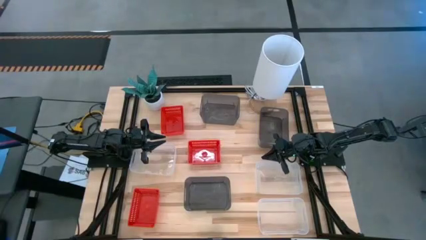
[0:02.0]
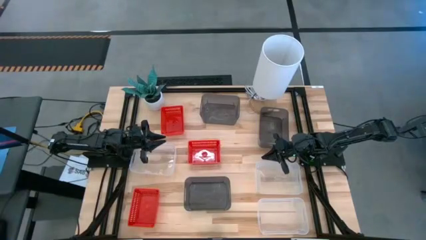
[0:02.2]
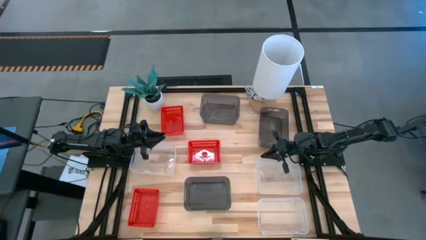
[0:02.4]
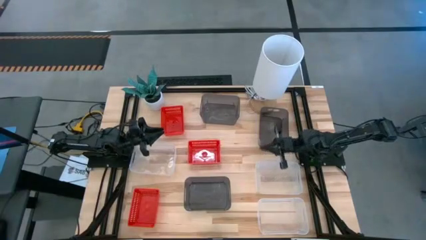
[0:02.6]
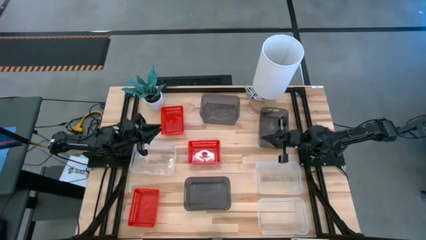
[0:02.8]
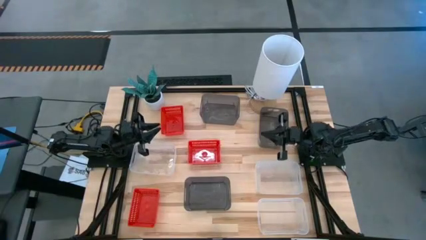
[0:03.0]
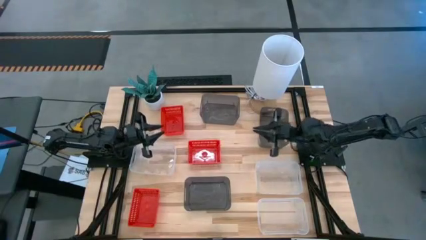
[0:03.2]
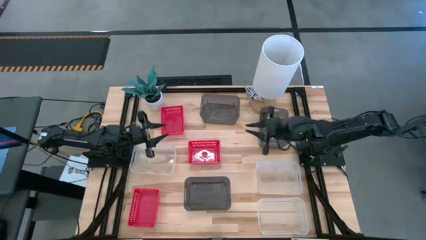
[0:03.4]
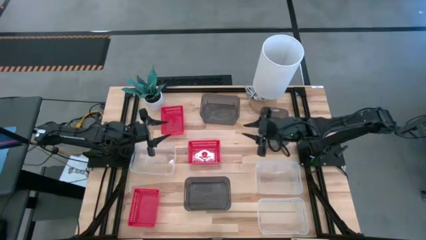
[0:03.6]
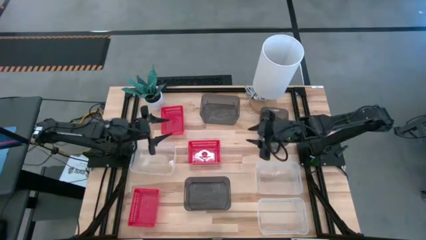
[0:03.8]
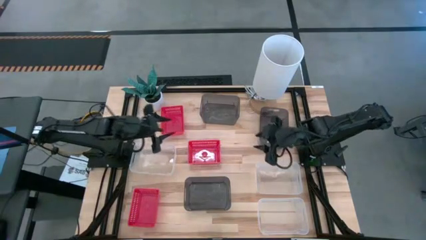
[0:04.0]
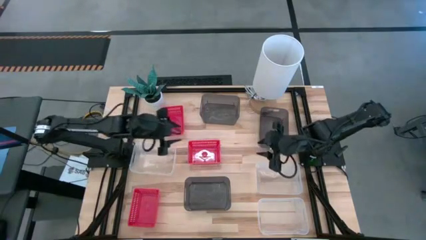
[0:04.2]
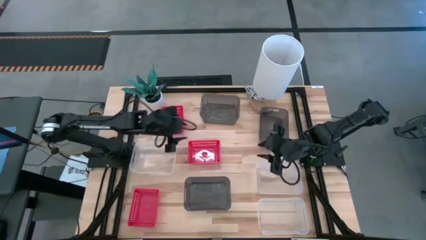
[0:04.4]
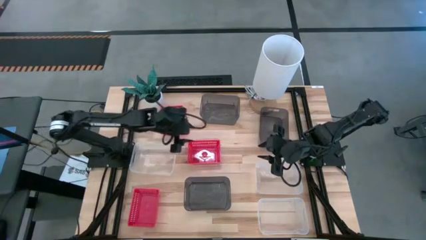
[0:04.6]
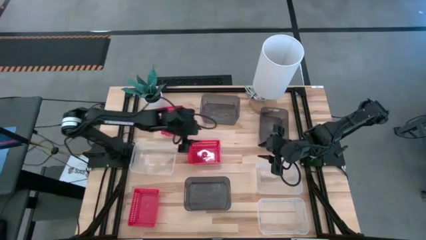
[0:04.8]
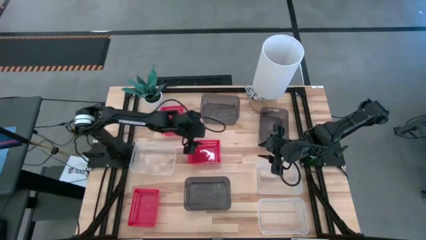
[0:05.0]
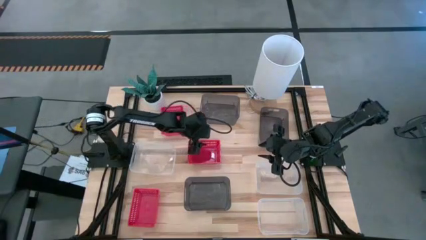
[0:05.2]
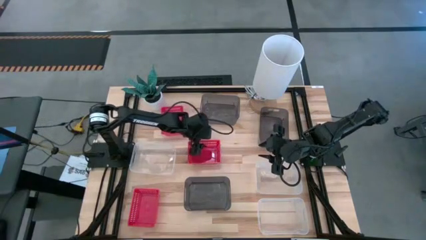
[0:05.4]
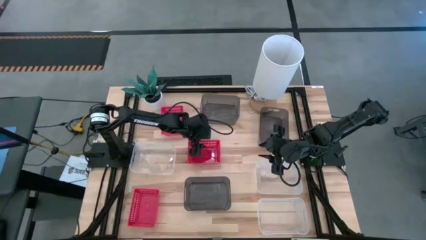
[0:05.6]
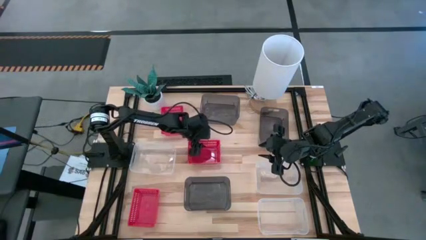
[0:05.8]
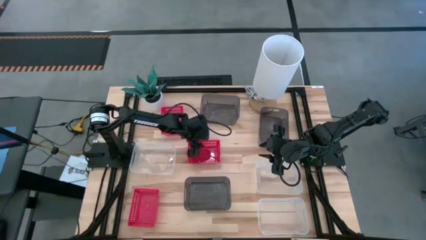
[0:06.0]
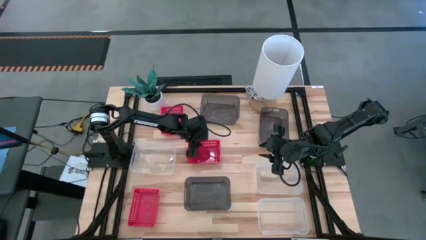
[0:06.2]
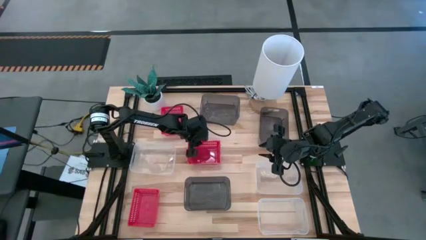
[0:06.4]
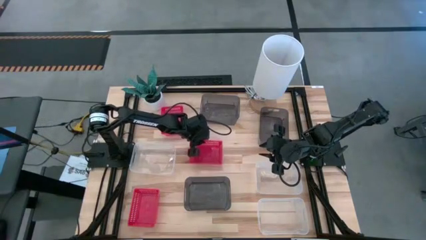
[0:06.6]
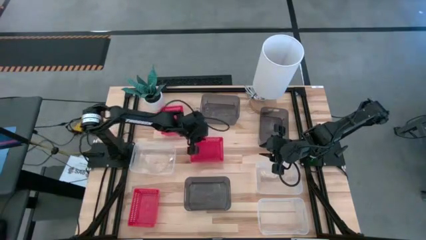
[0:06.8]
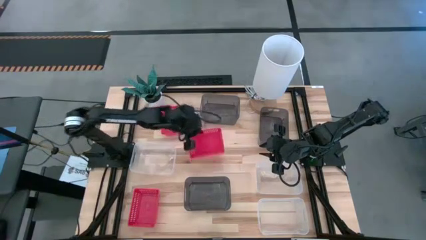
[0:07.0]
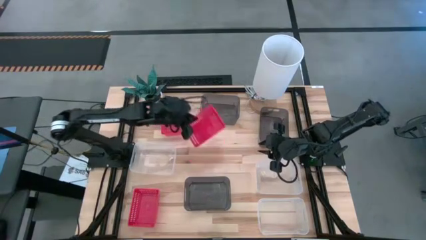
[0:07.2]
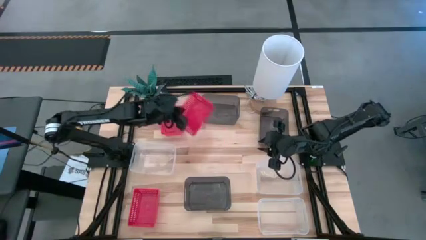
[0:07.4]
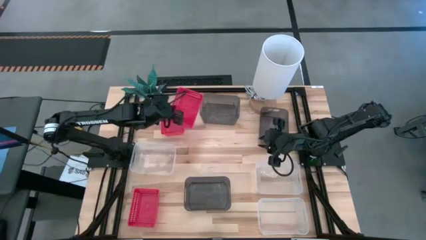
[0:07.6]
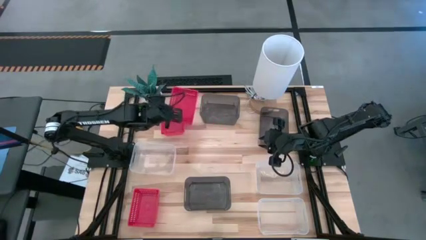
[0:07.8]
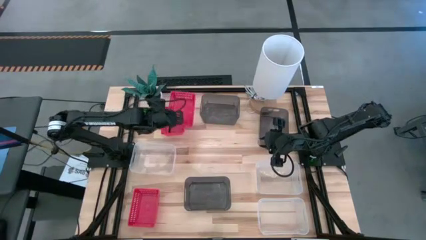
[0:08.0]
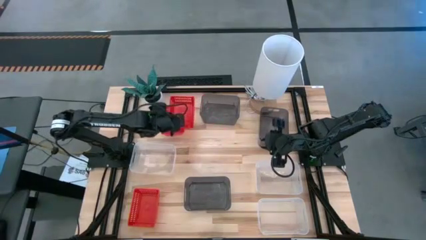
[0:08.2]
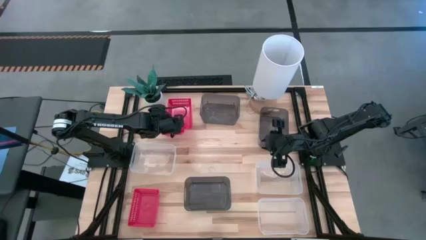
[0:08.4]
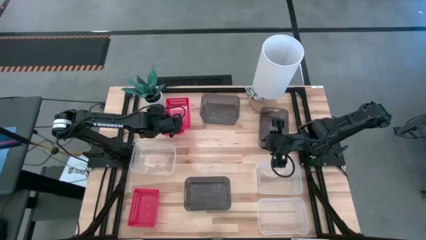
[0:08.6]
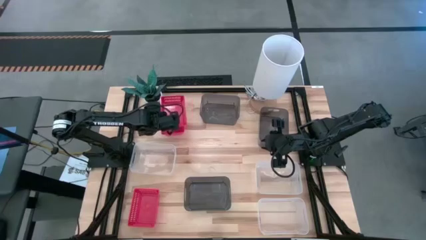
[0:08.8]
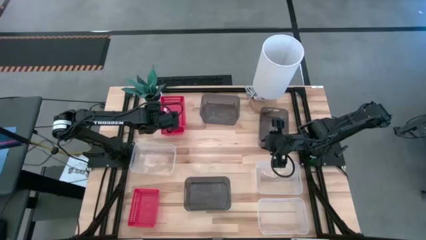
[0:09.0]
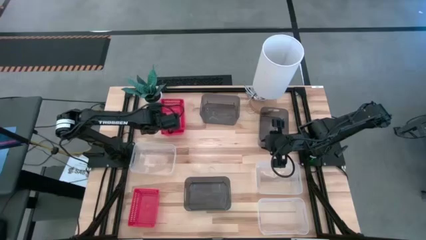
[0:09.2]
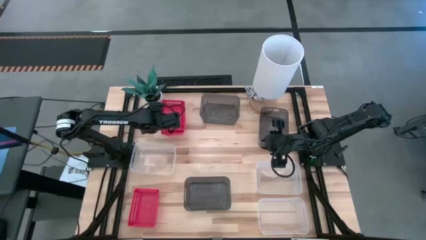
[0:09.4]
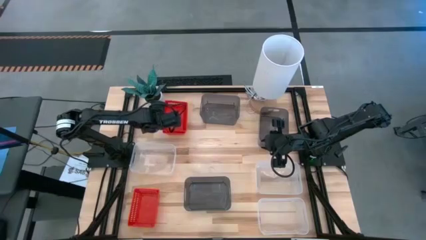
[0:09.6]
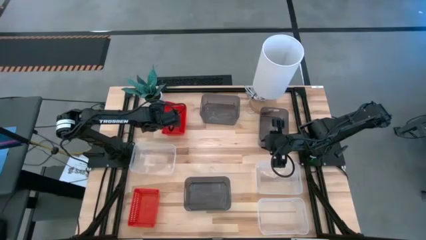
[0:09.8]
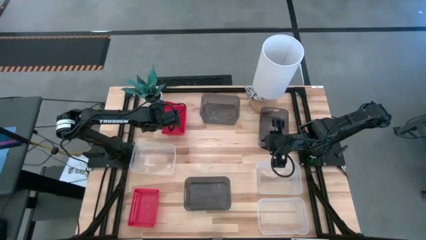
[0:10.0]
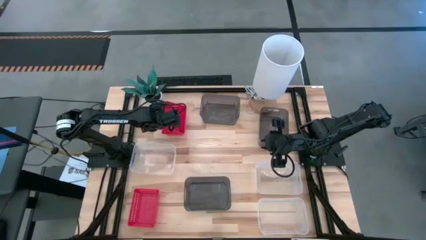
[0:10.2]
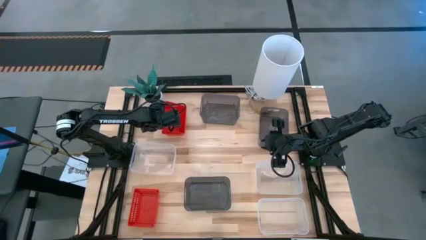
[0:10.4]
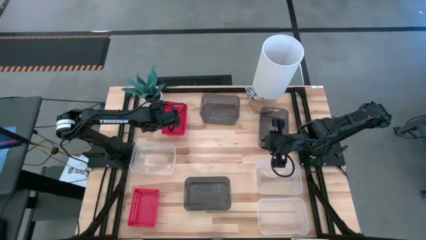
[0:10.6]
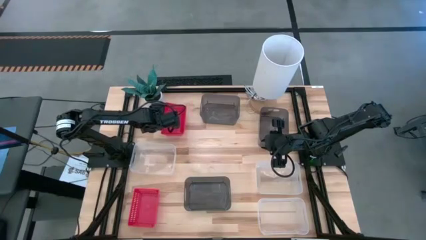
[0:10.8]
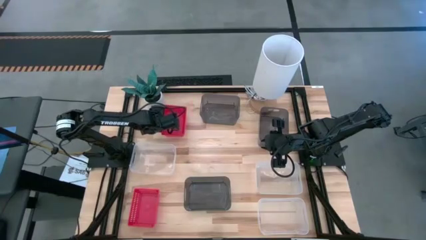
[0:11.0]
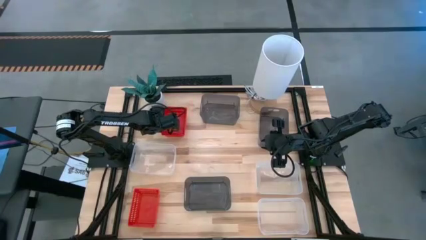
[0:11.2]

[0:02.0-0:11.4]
Stack the middle red bin on the top red bin
